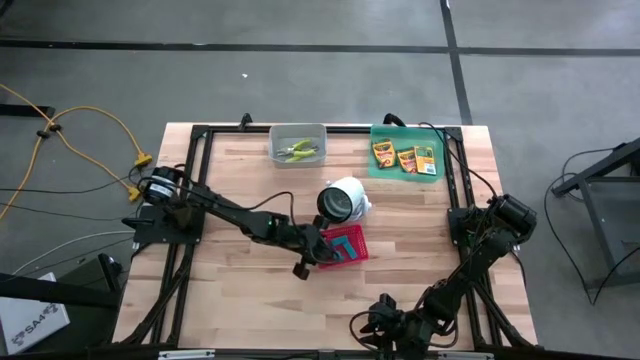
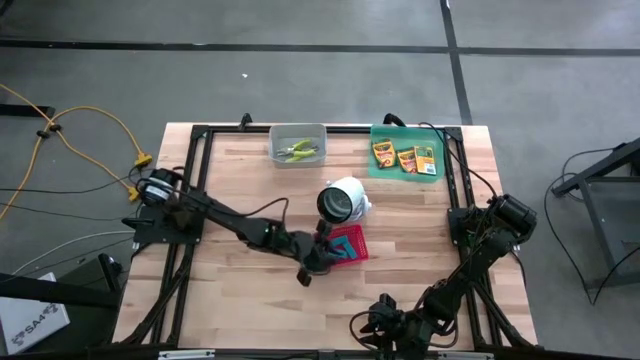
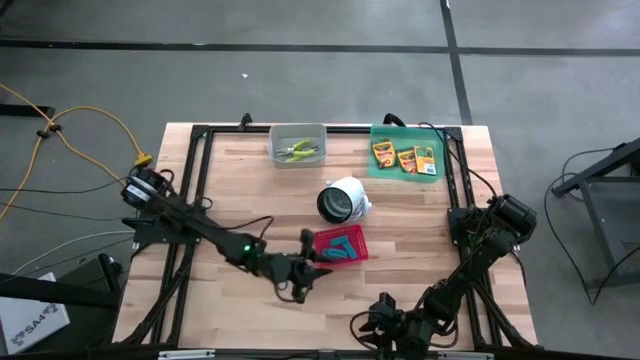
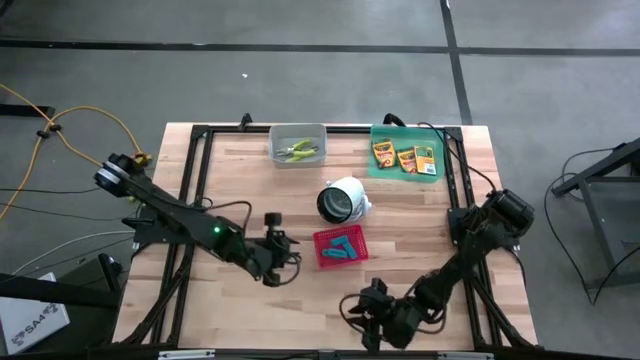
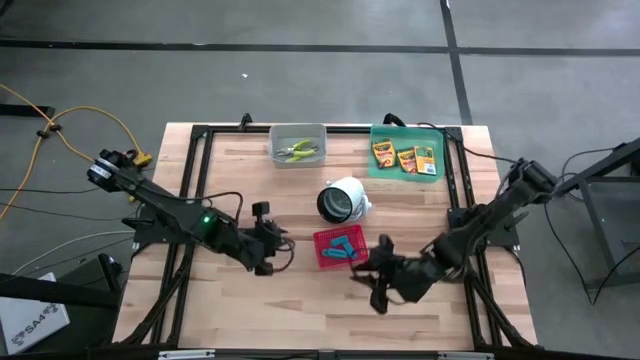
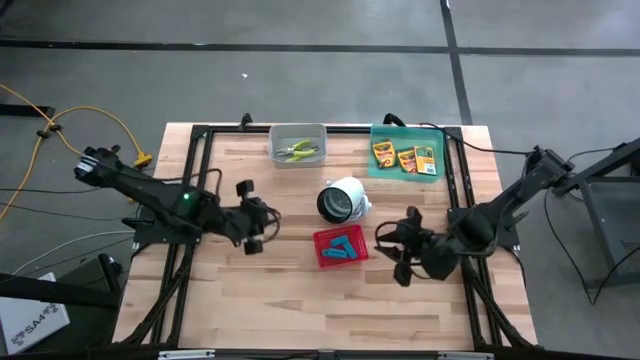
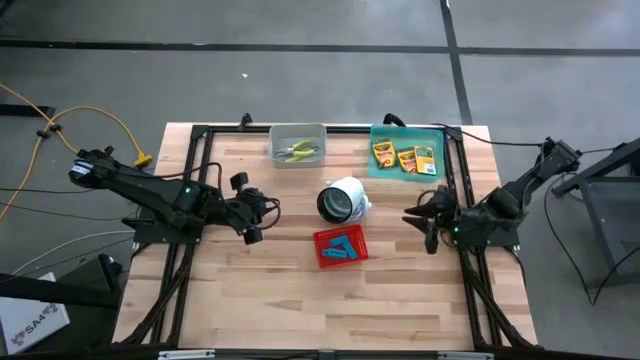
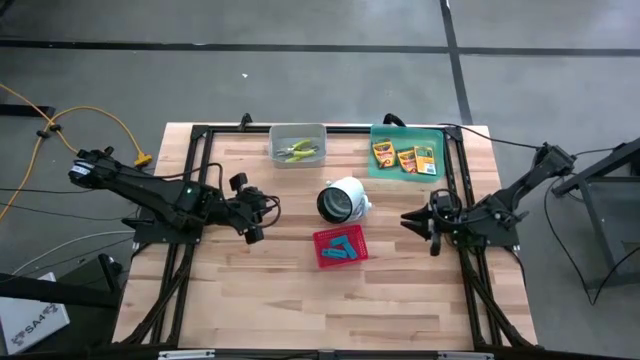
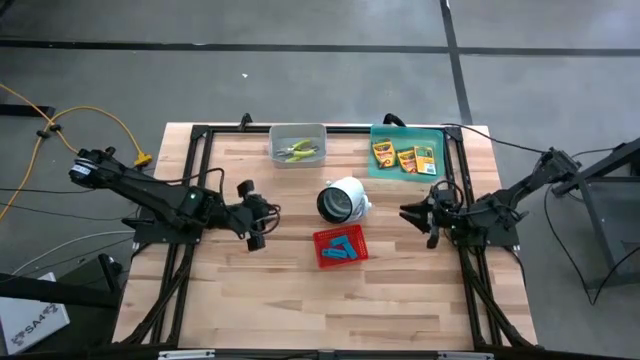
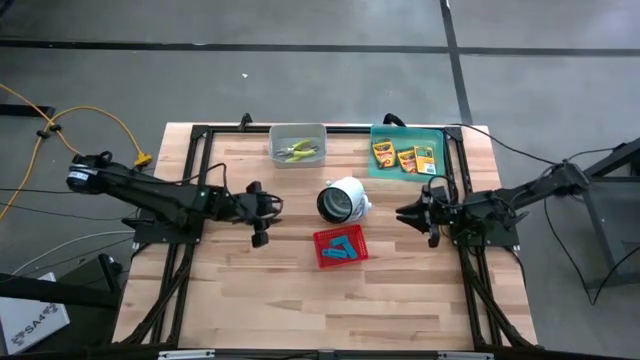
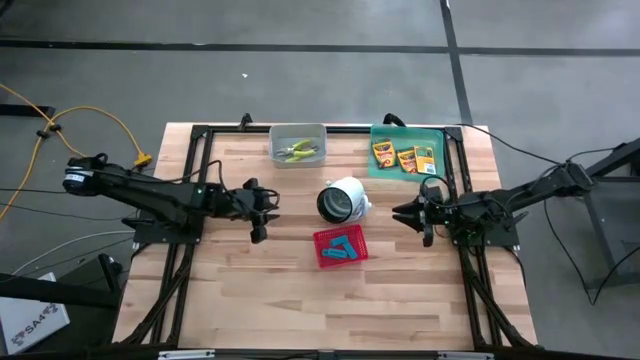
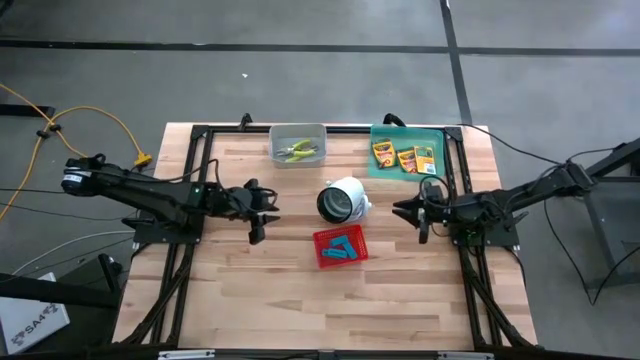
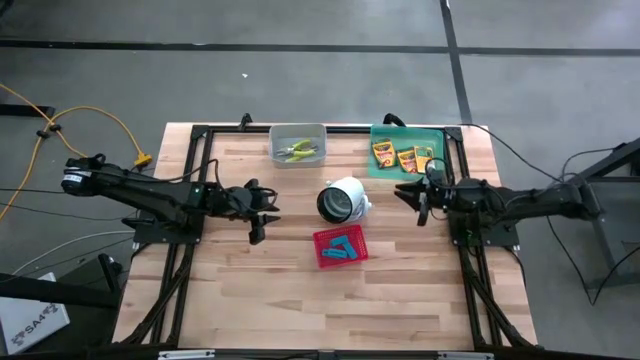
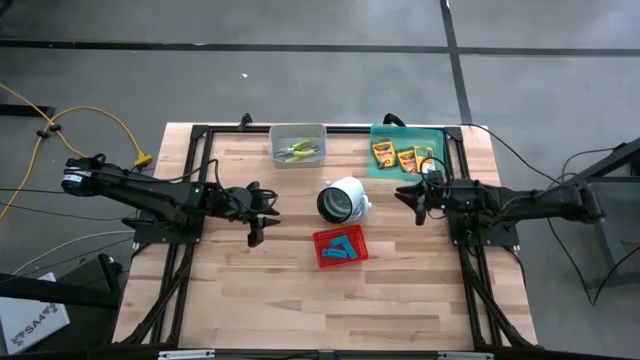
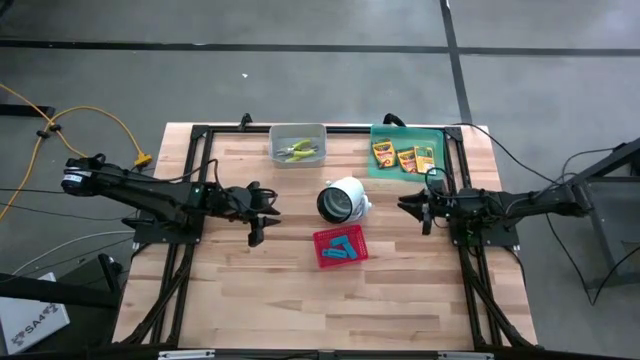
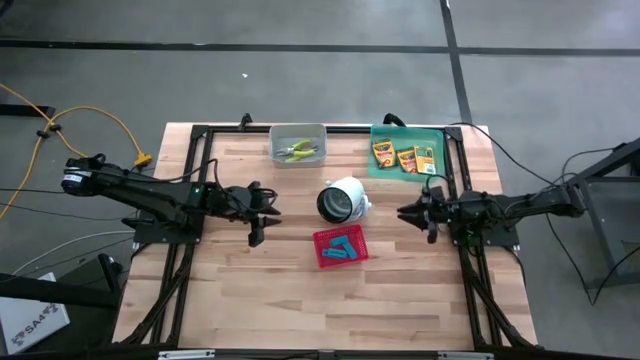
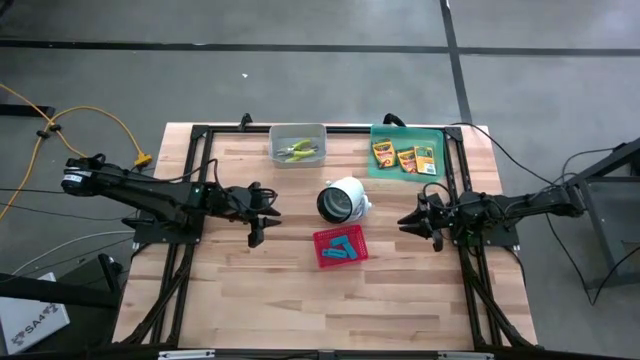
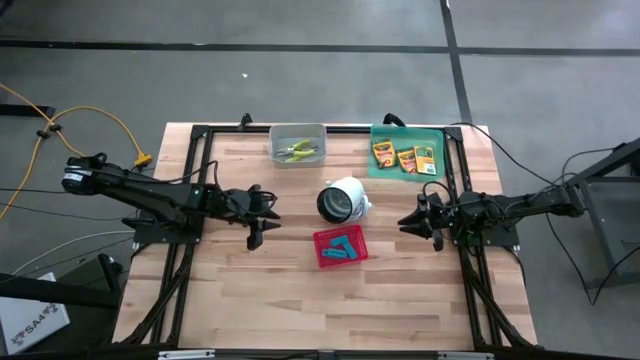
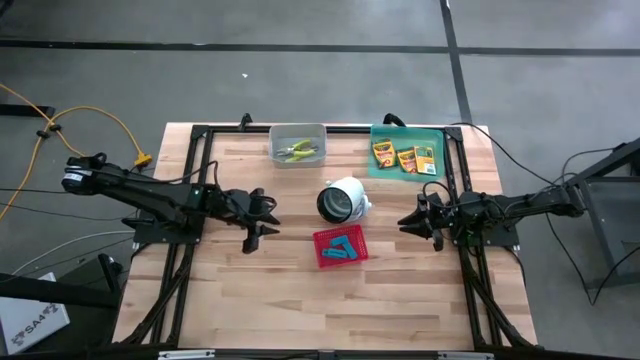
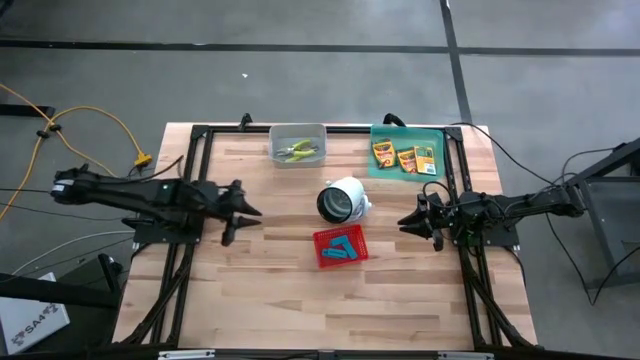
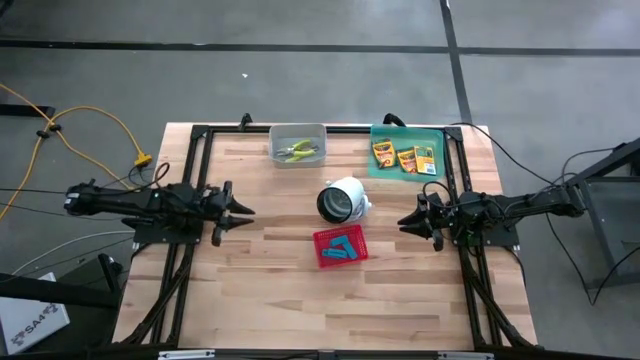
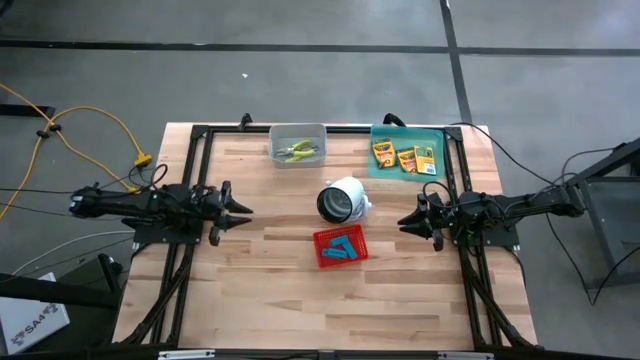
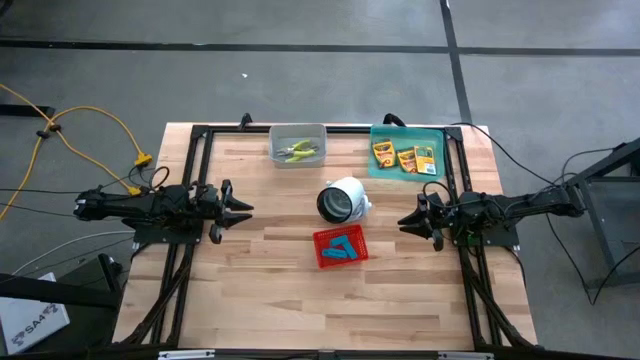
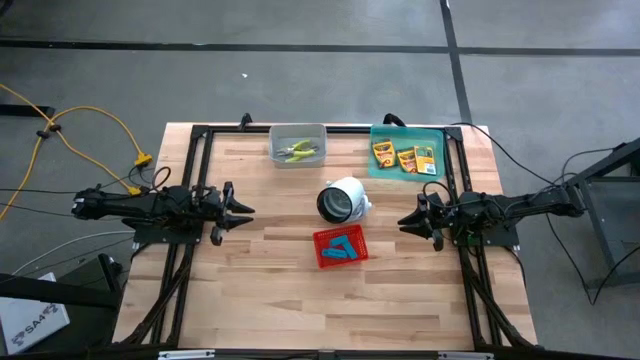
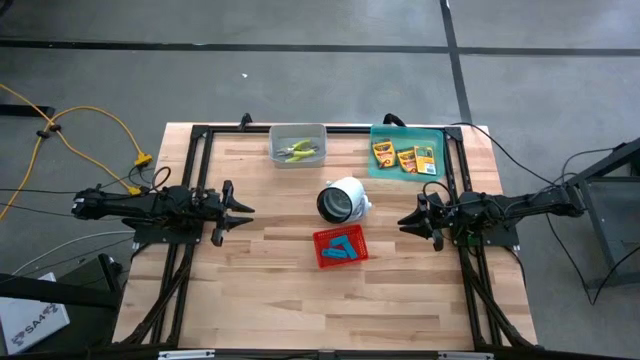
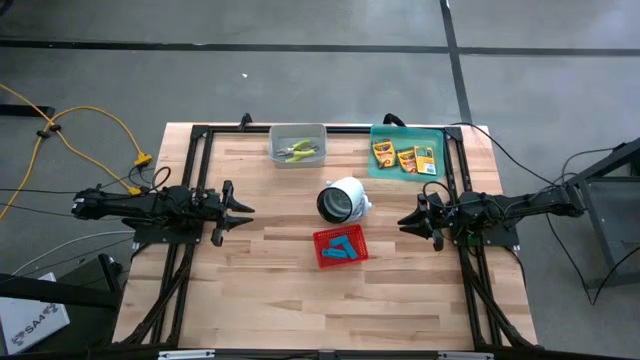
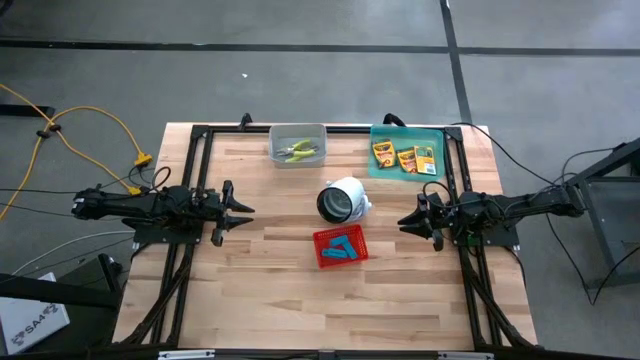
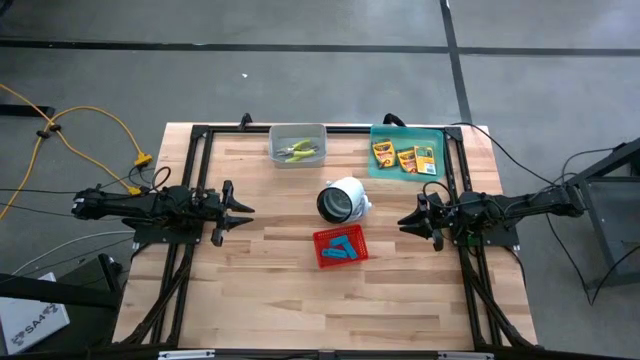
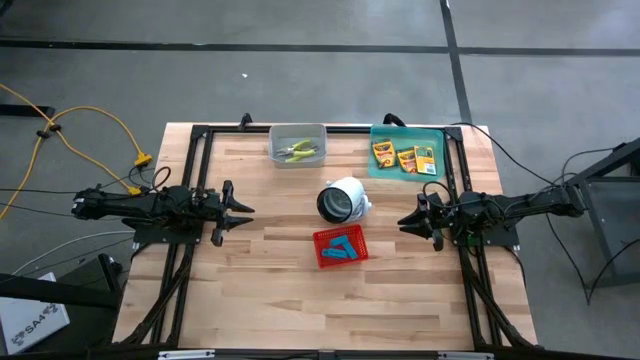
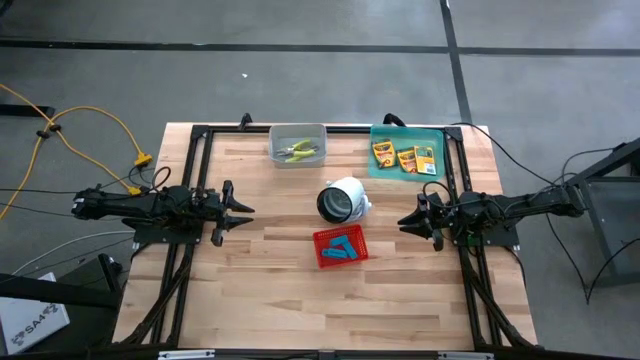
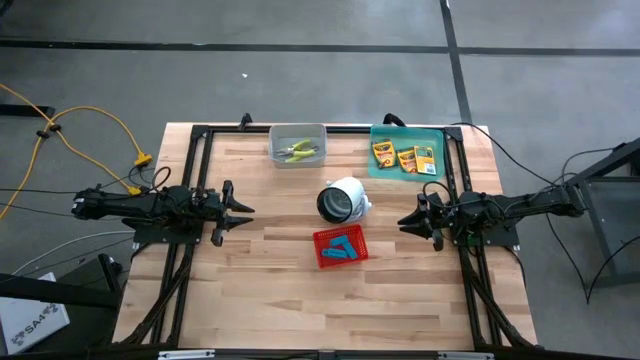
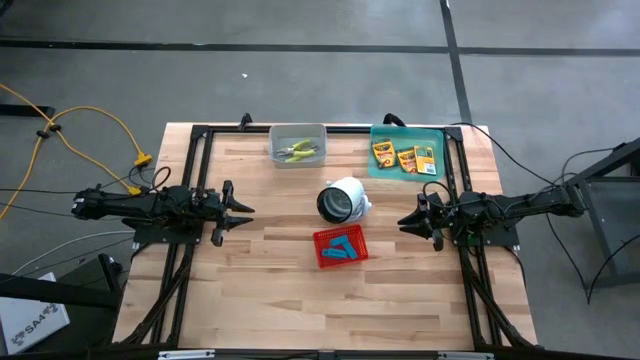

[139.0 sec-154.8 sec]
Task: Pick & Place School Supplies
Return to Home Position

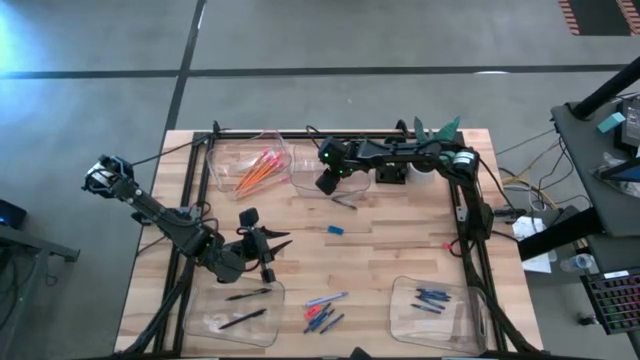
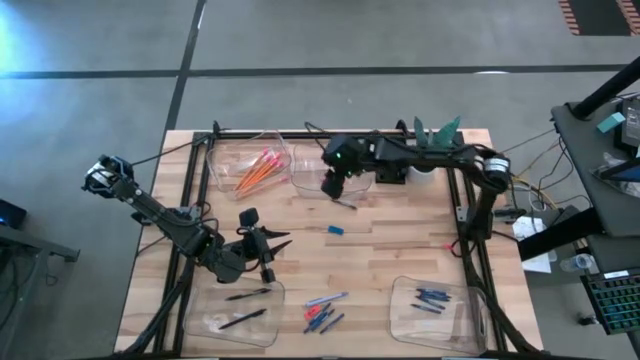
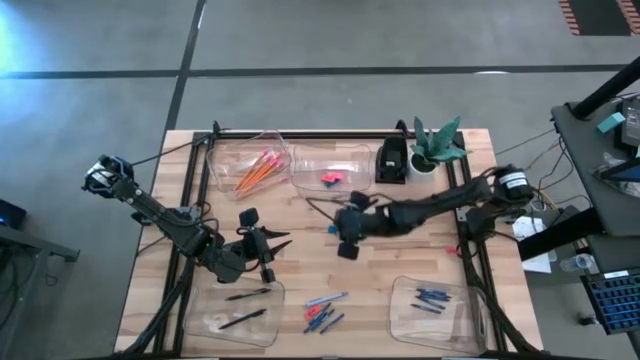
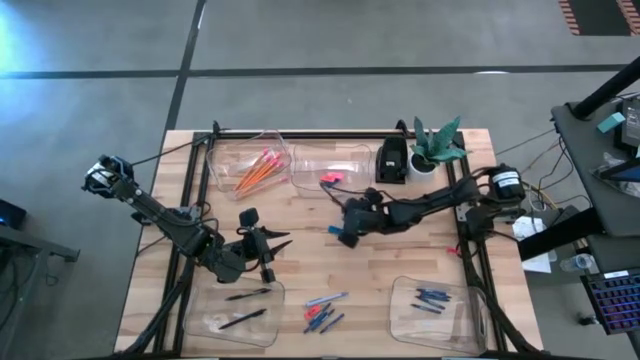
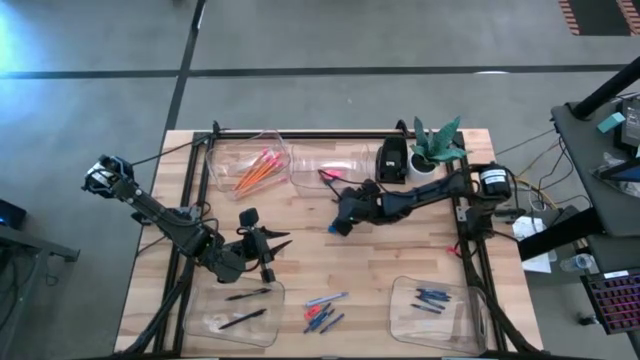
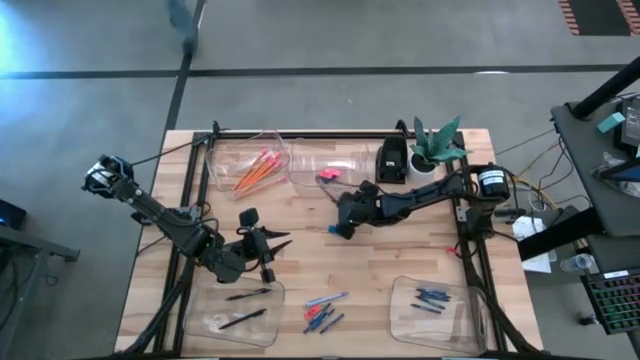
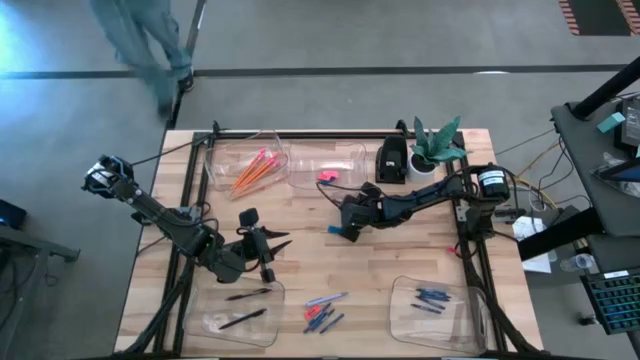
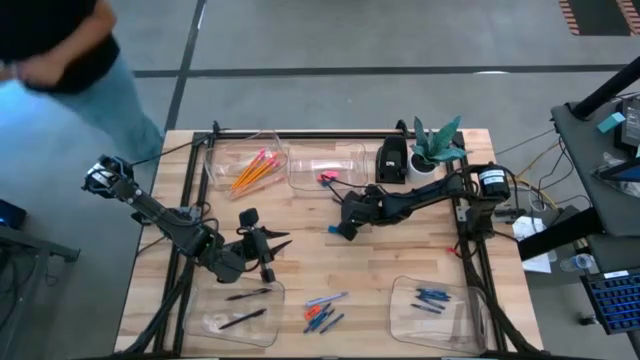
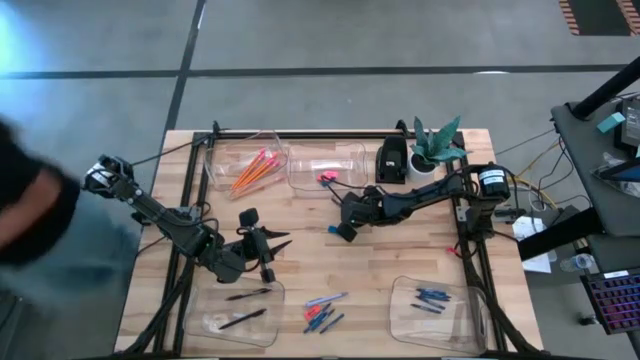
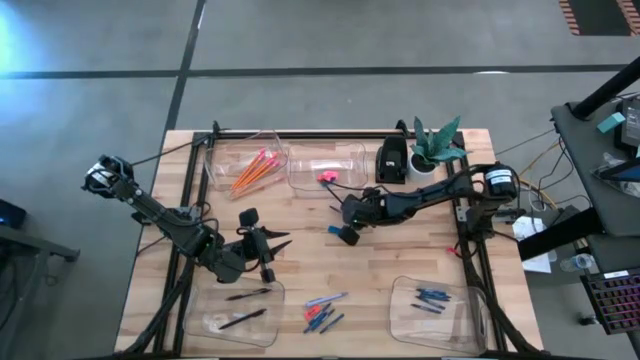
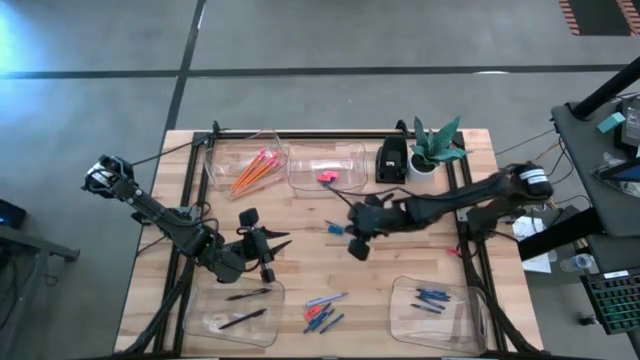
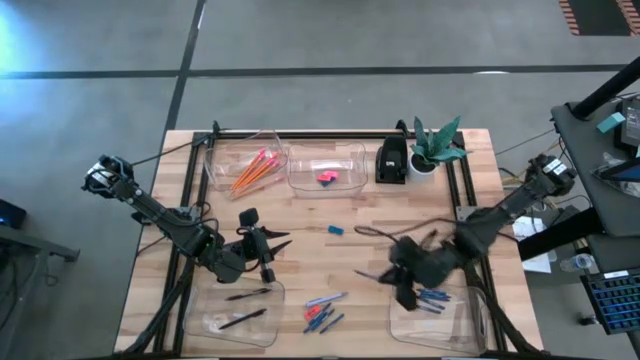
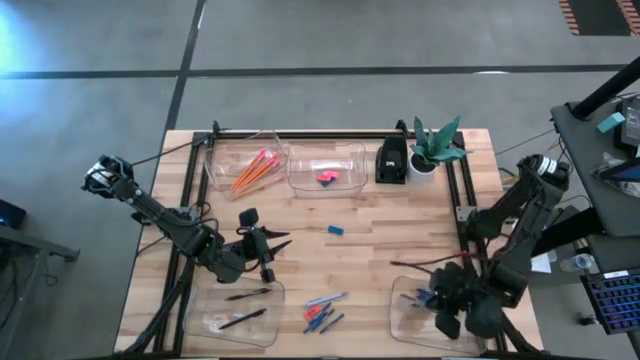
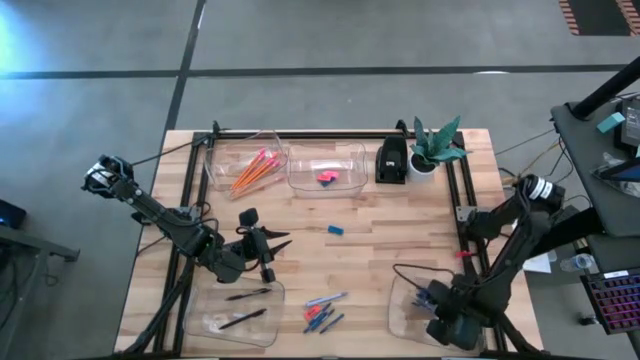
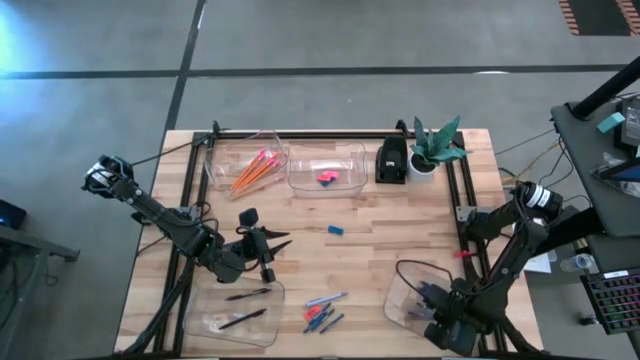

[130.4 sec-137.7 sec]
Task: Sort crayons/erasers/pens/pencils in bins
Put the dark blue crayon into the bottom right transparent bin
